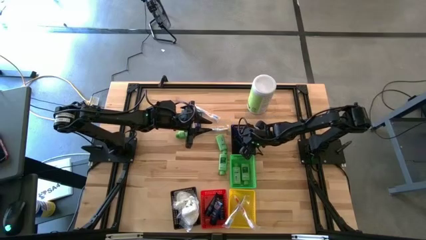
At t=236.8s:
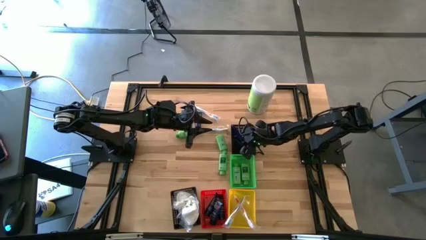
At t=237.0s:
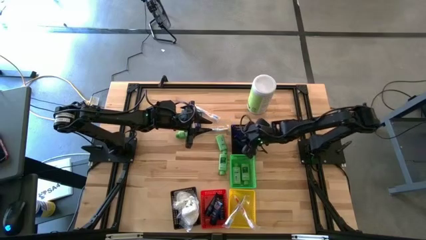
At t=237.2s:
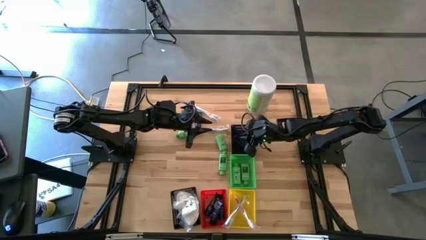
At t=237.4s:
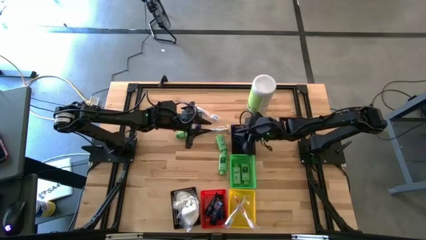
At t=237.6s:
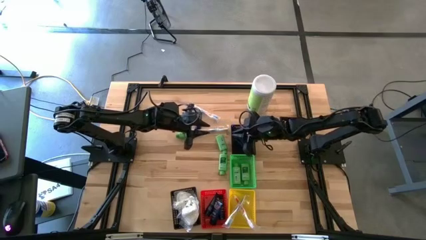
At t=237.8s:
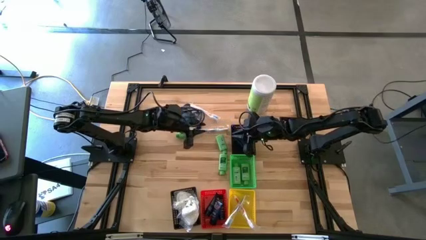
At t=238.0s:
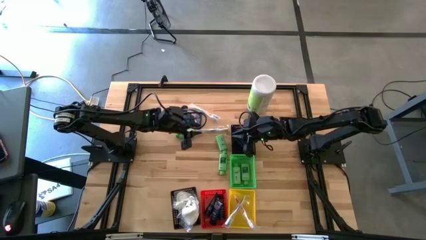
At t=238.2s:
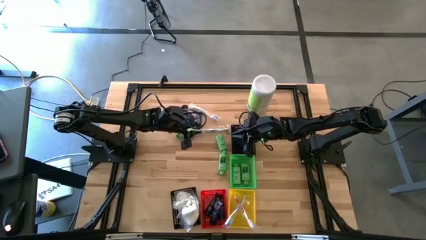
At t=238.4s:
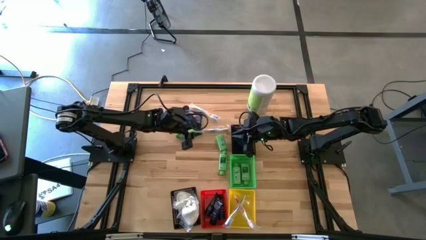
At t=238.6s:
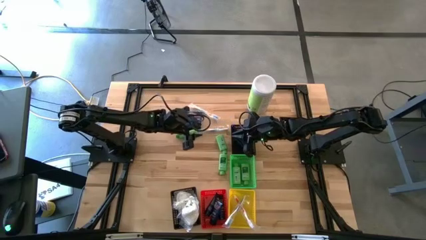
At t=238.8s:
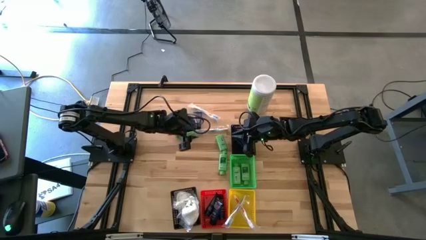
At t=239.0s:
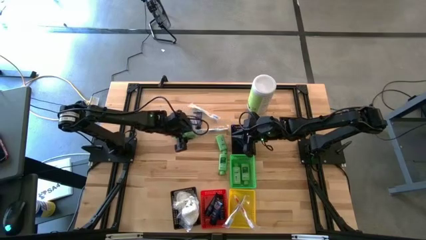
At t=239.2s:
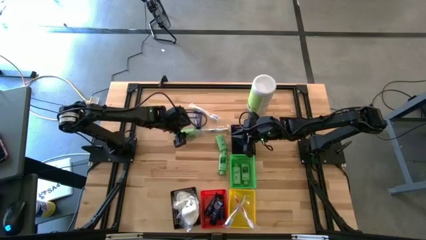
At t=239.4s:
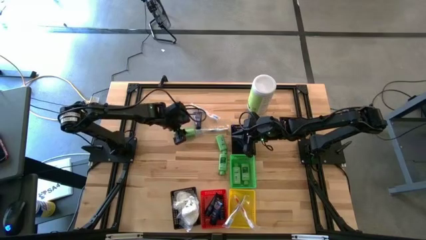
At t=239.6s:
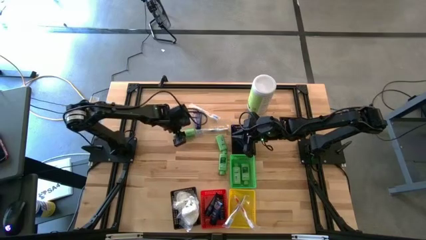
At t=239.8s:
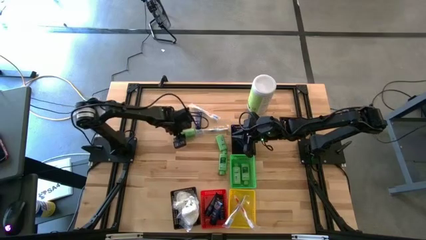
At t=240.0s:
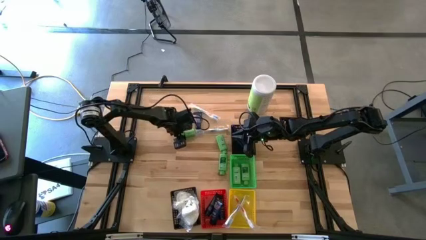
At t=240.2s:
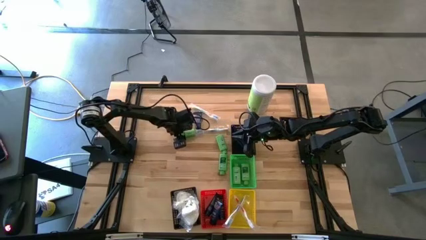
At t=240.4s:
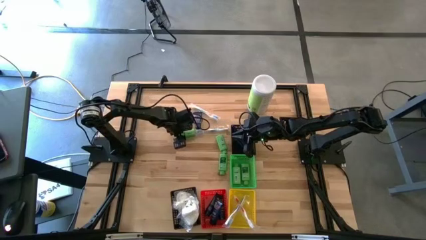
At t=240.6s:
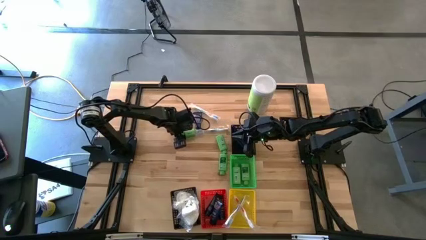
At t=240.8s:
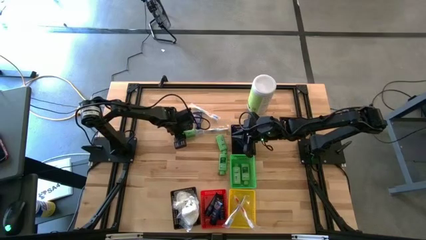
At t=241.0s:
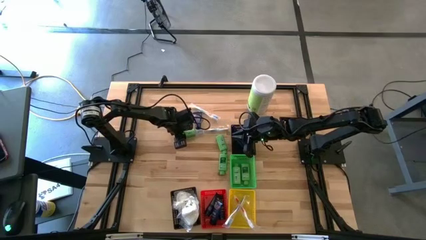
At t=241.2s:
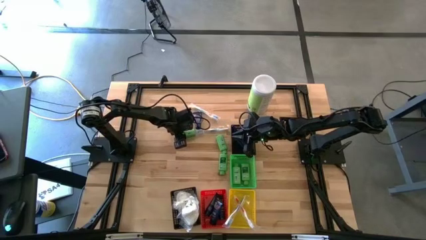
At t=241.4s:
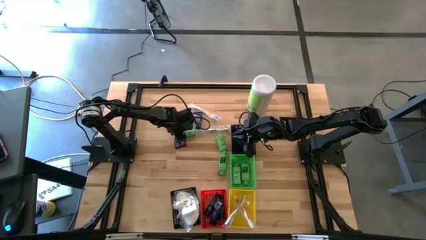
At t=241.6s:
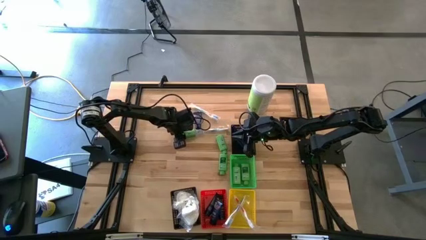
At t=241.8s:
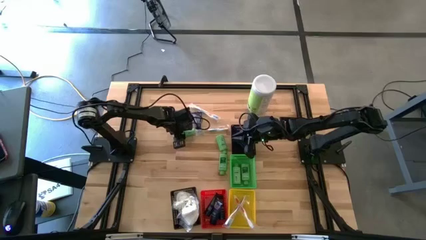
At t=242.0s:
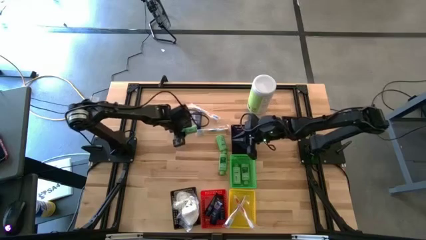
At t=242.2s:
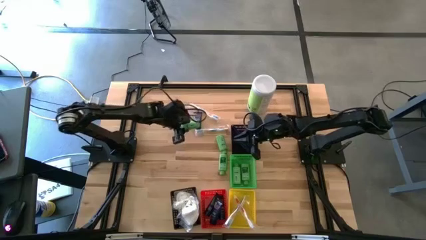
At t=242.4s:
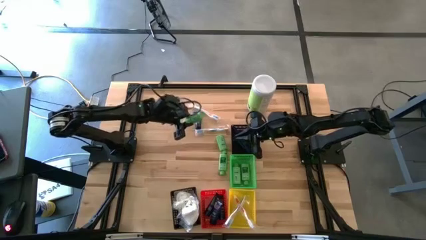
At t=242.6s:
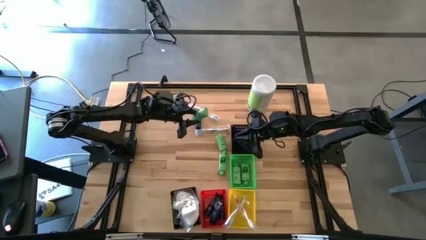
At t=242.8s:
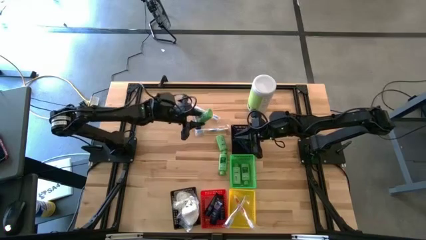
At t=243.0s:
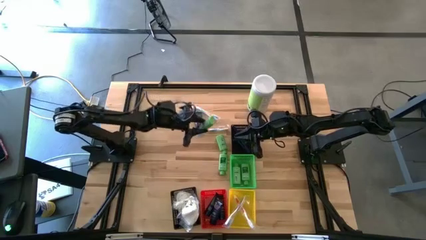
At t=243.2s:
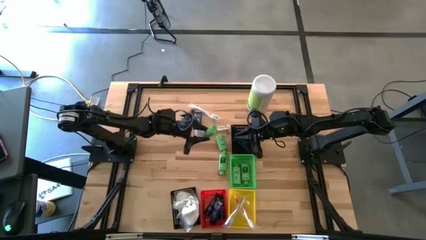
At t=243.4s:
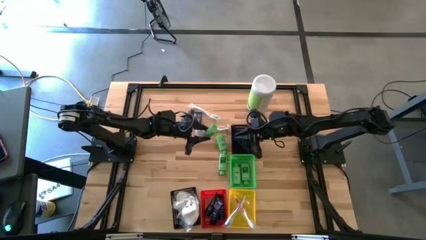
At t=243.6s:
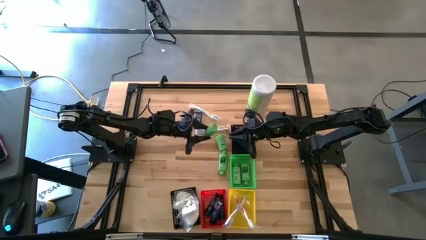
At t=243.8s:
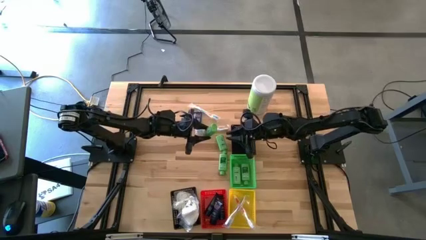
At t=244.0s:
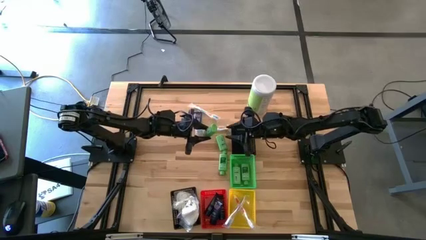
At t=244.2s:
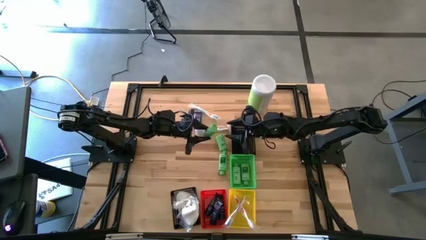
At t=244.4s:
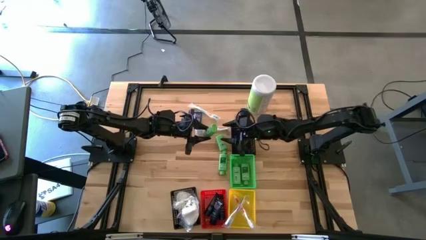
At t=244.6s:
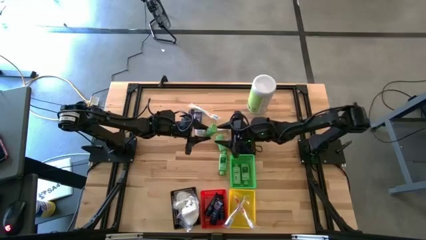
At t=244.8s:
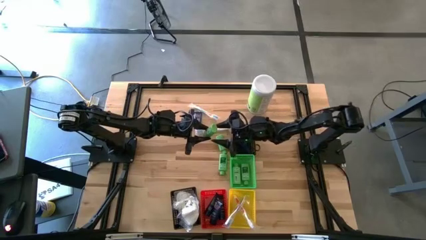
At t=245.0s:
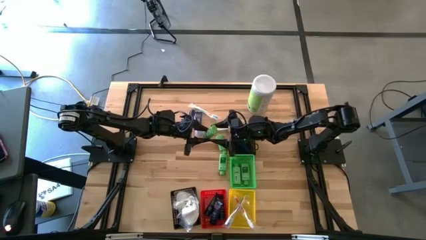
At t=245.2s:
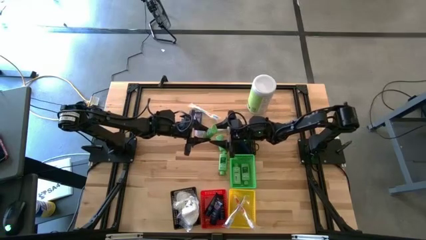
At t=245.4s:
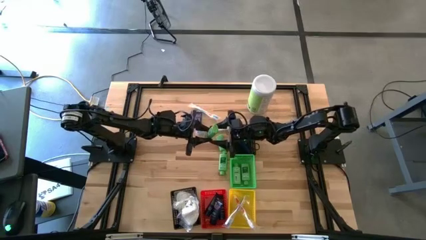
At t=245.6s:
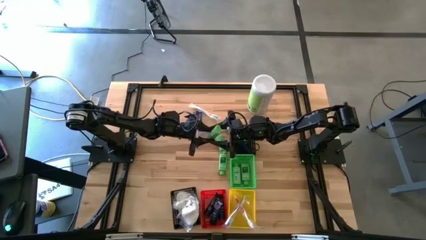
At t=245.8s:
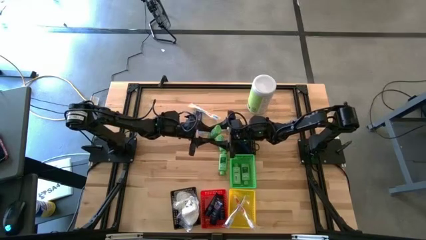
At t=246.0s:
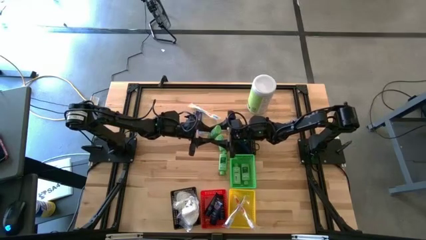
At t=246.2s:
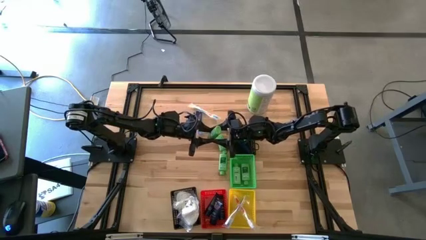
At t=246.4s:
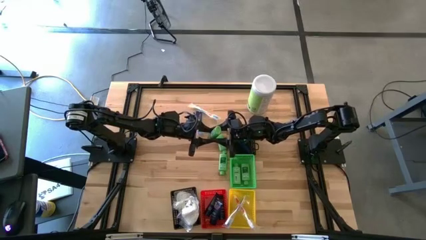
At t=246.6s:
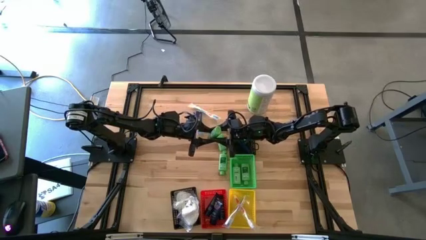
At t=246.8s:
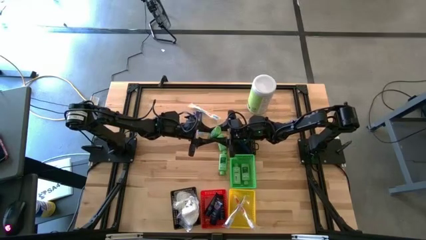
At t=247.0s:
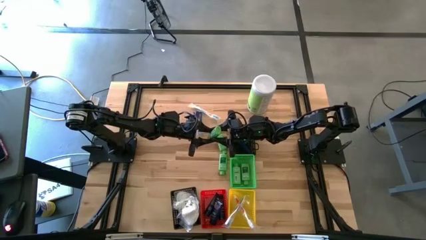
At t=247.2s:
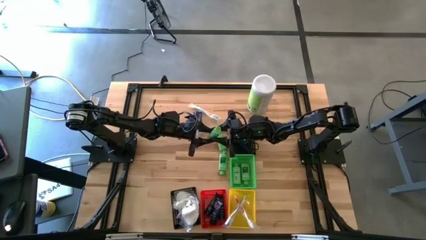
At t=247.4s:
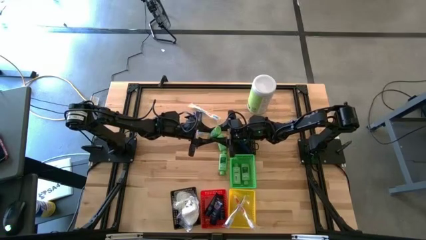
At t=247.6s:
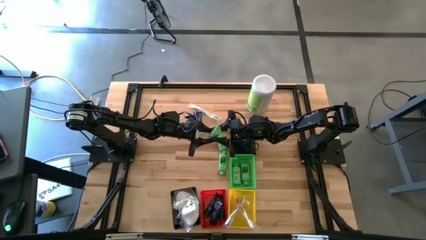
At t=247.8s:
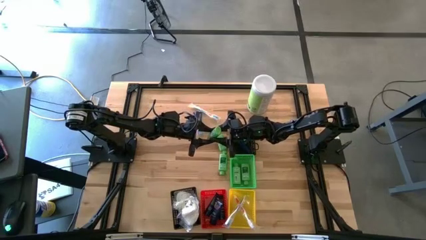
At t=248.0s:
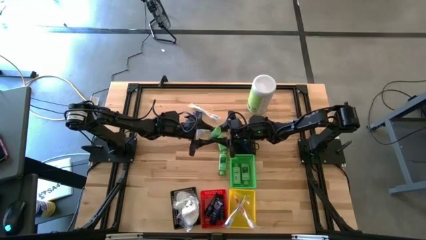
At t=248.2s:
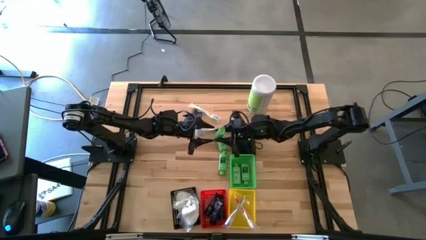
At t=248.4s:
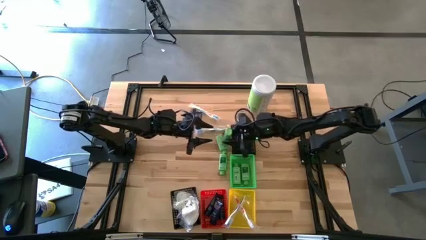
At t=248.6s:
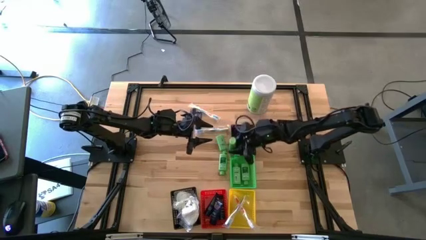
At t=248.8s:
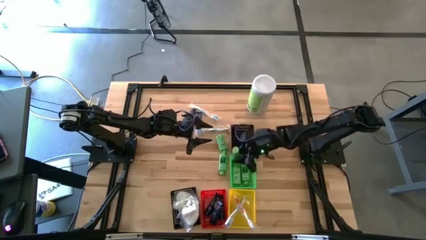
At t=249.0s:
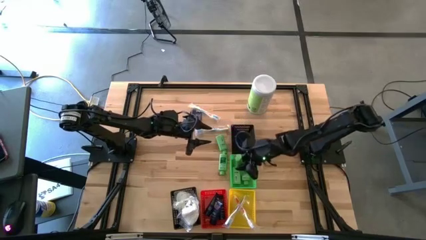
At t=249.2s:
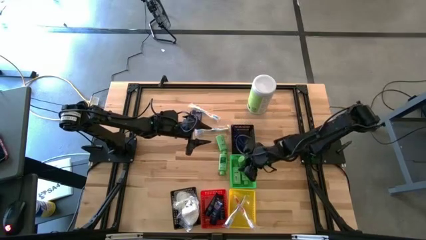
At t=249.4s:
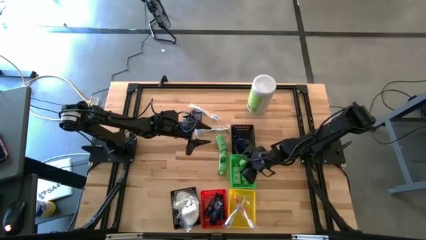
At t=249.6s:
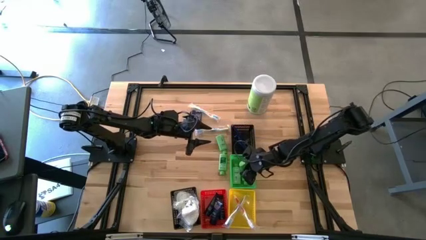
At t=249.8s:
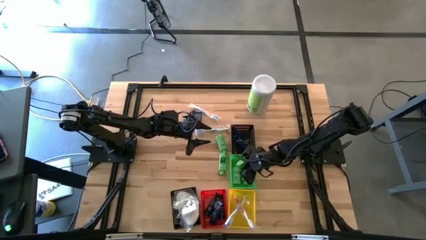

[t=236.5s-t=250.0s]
Task: Pick & Place Travel size toiletries
Put the green shampoo into the green bin

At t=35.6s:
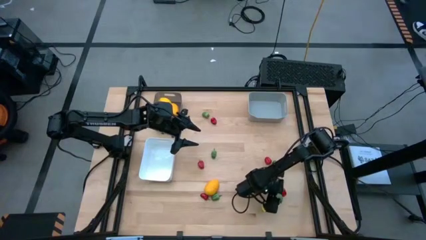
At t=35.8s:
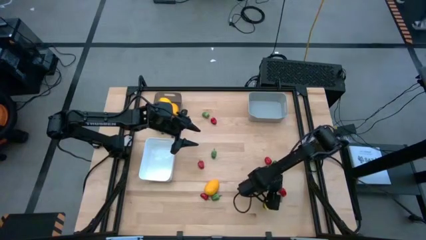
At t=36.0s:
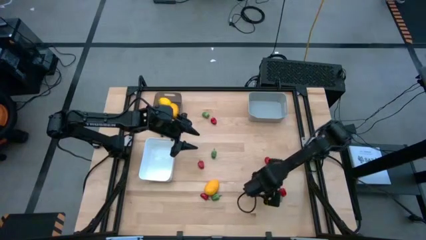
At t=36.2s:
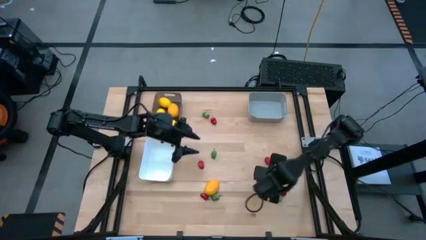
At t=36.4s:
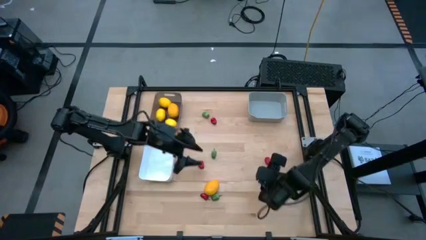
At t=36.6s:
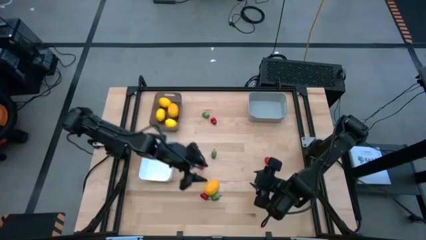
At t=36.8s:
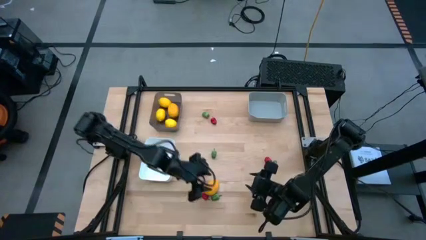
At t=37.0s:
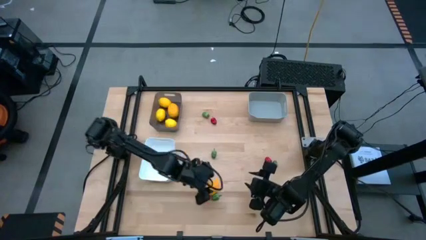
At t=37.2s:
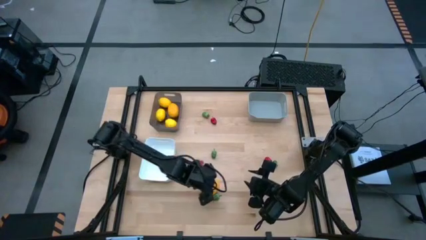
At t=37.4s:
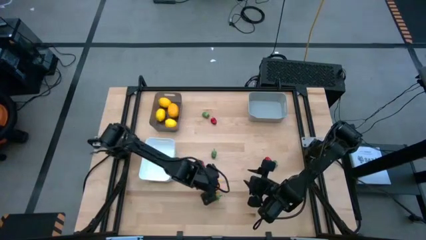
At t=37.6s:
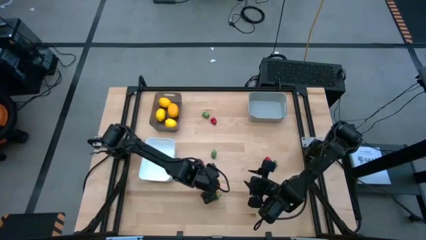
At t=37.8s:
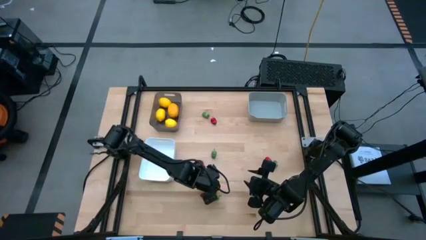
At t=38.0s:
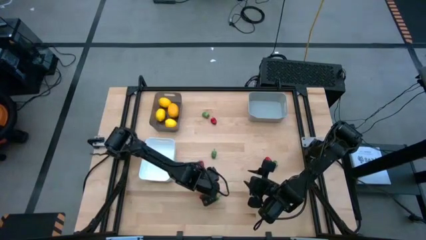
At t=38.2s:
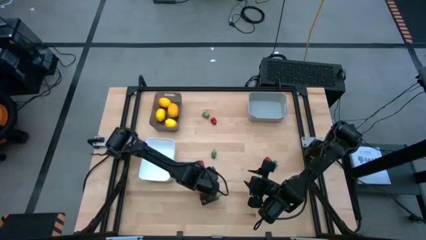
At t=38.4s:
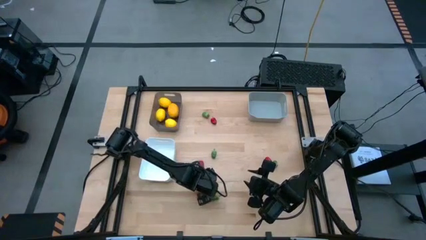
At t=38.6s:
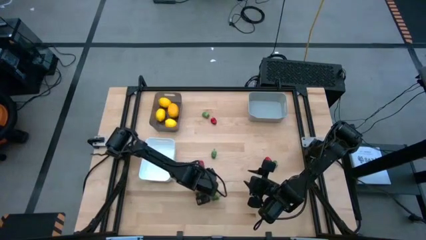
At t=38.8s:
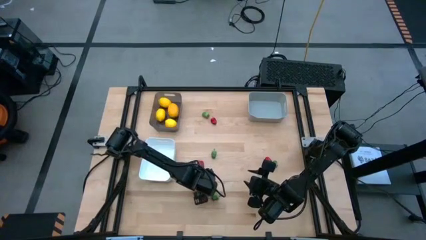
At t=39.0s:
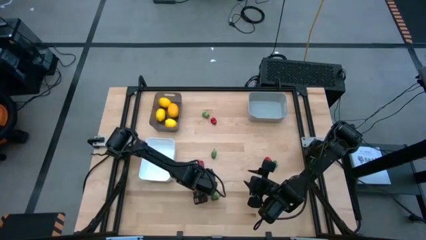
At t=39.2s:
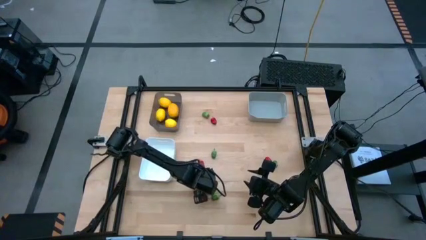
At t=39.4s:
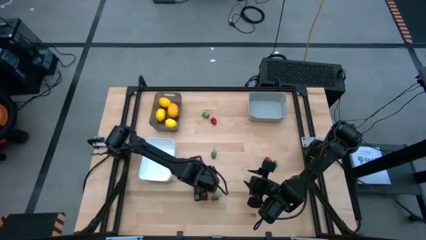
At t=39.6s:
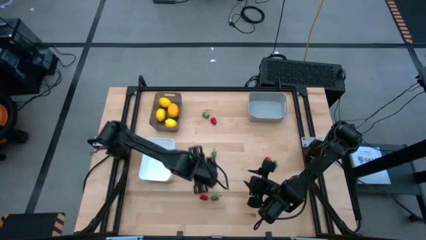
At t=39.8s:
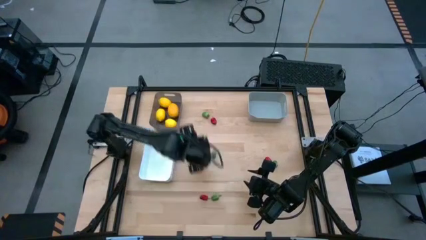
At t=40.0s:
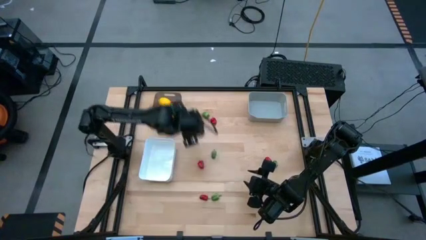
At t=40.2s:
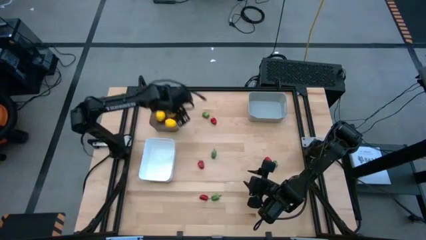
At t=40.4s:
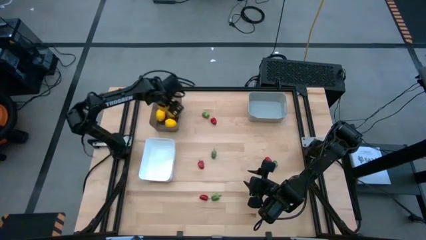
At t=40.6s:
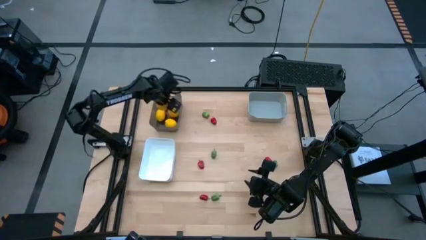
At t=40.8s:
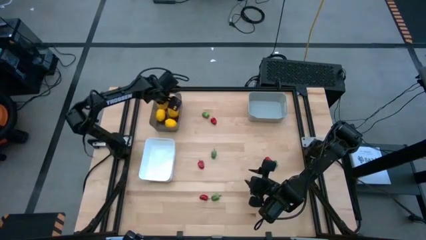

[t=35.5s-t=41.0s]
Task: Sort produce into baskets
Put the yellow lemon into the black bin
